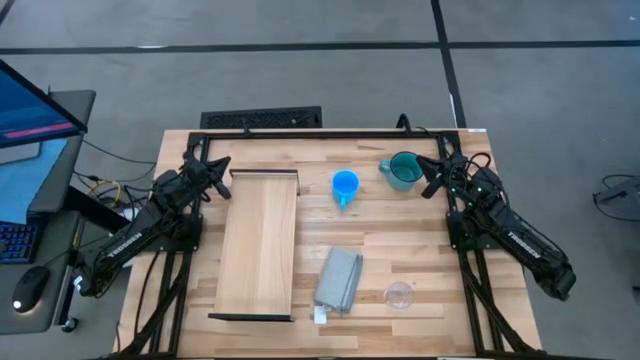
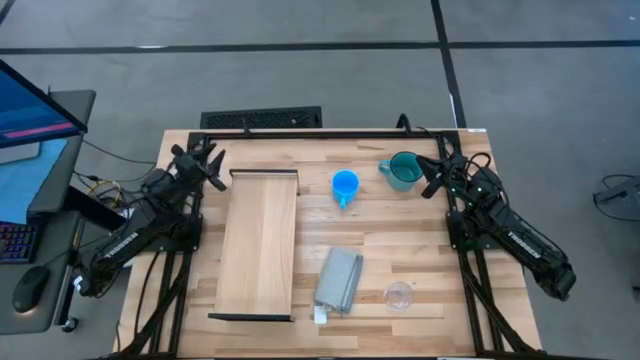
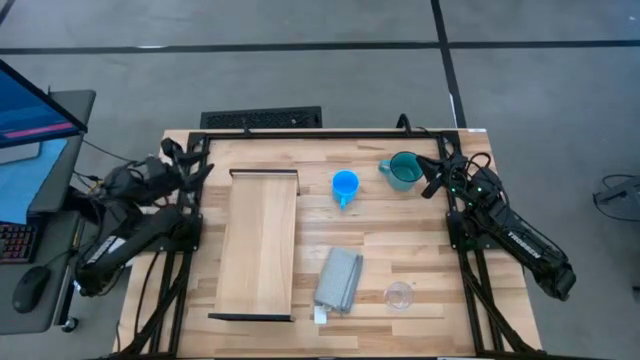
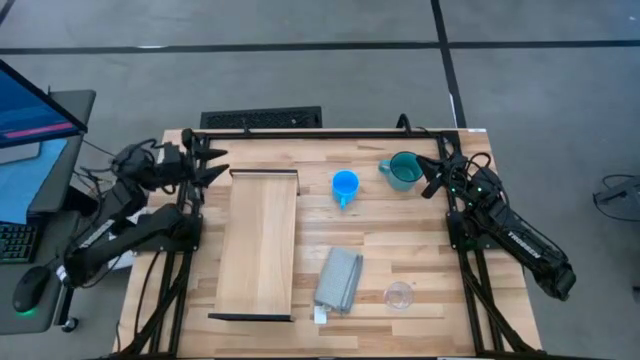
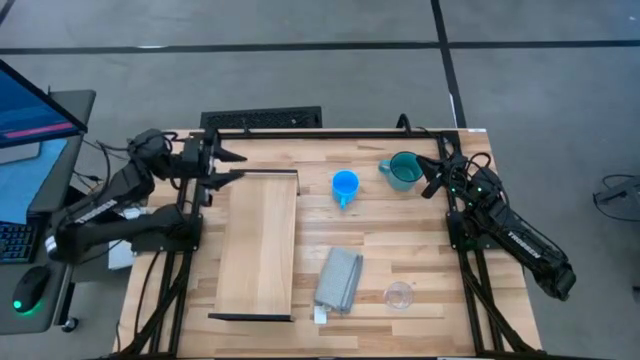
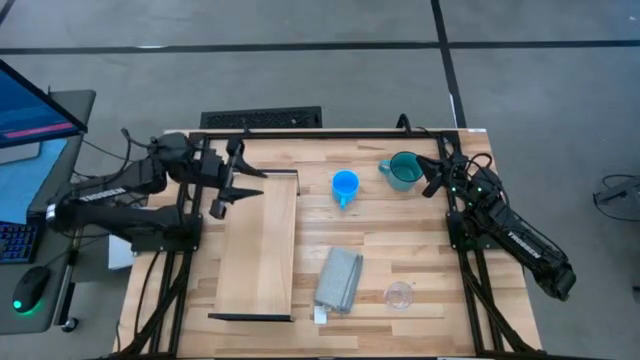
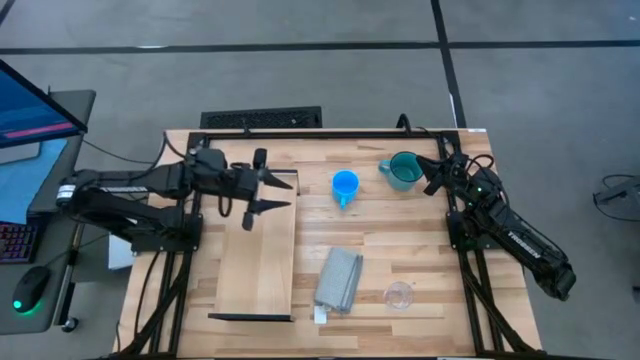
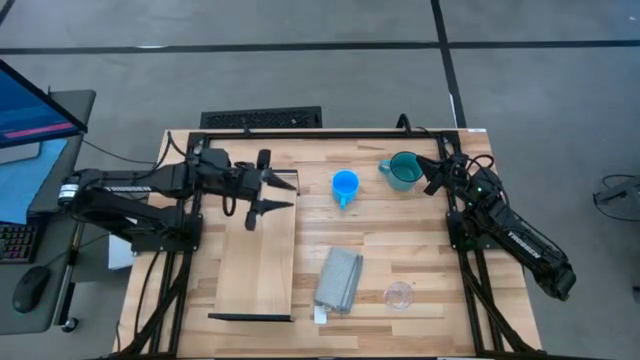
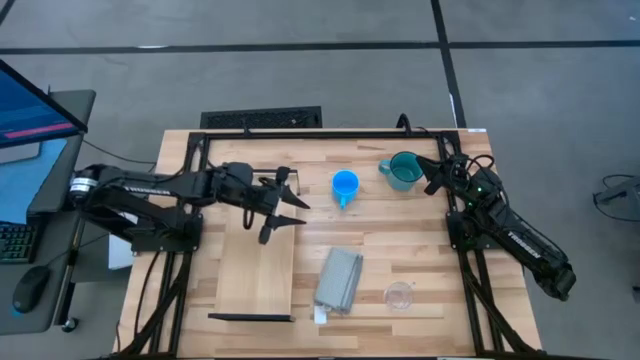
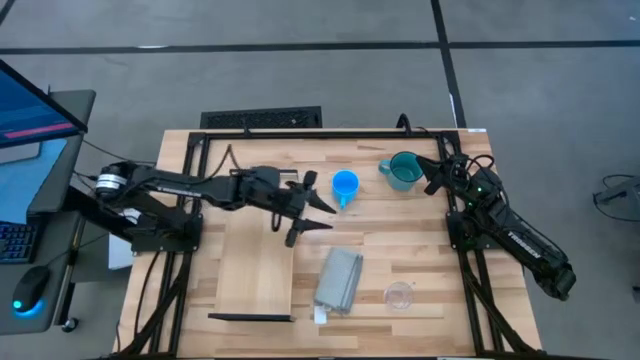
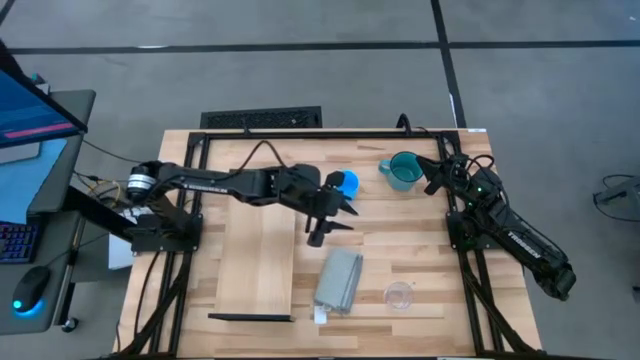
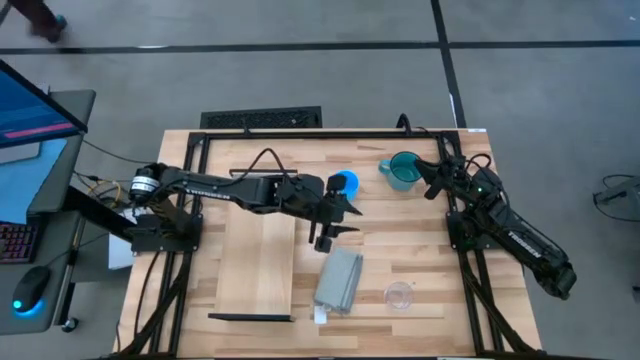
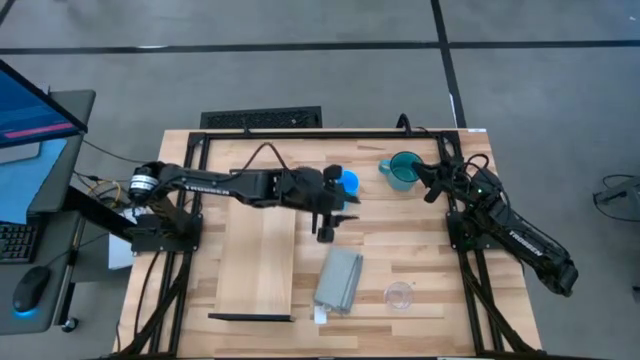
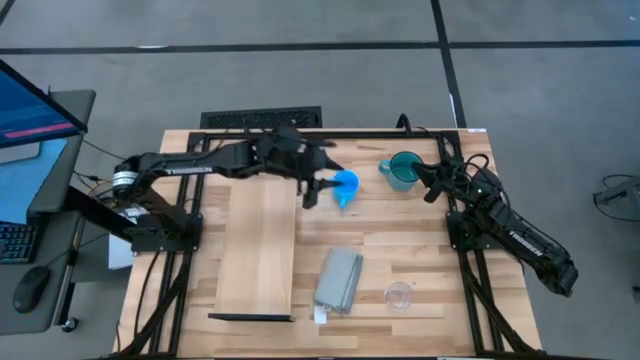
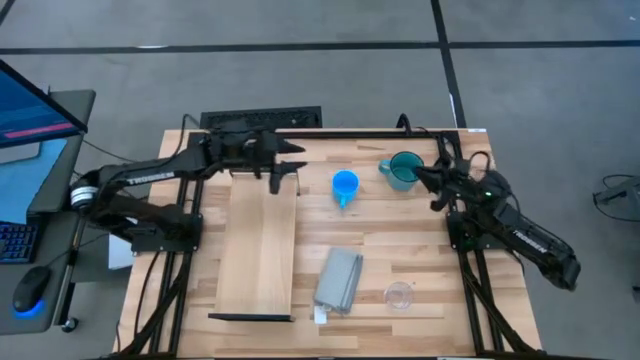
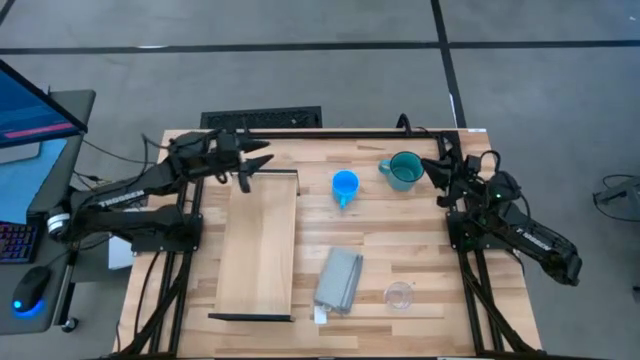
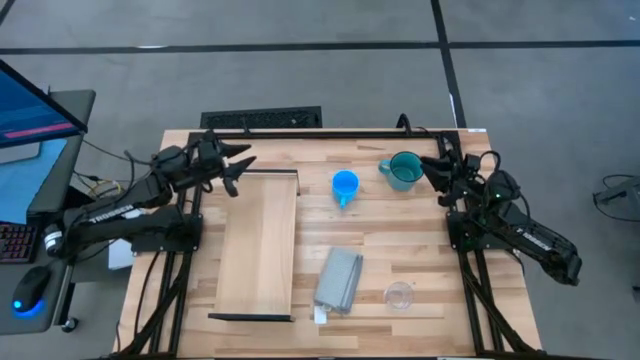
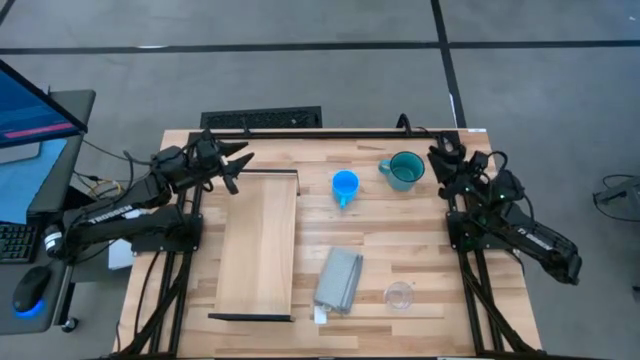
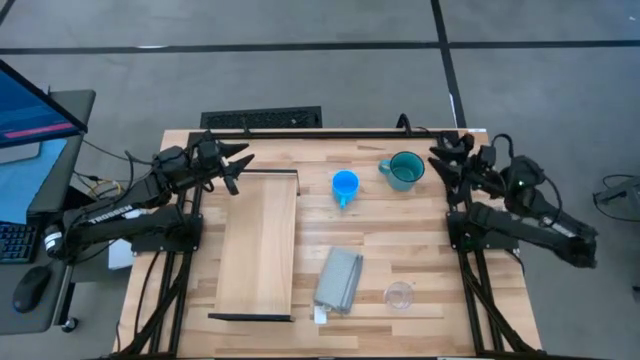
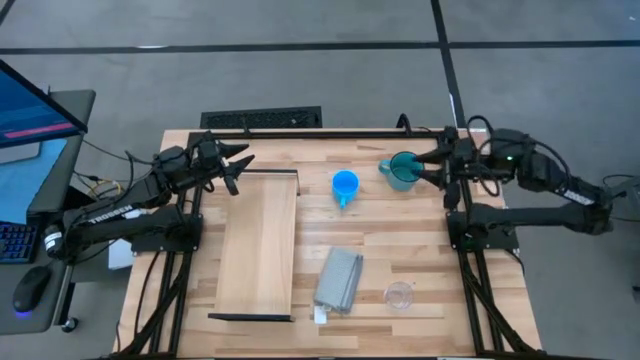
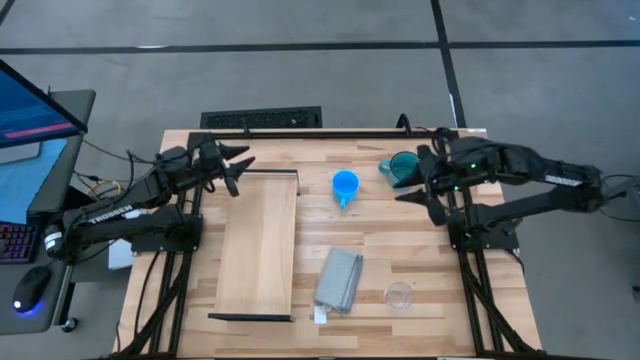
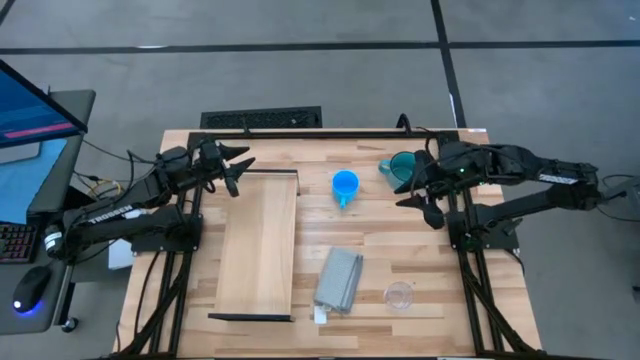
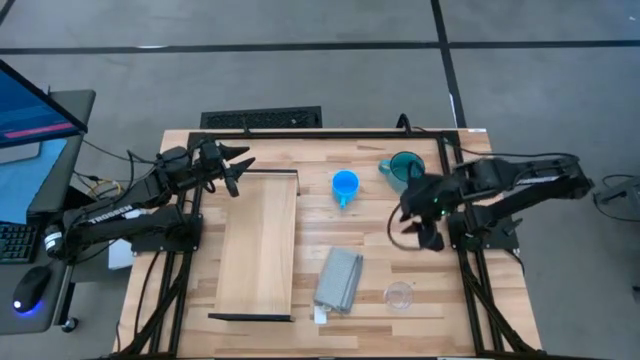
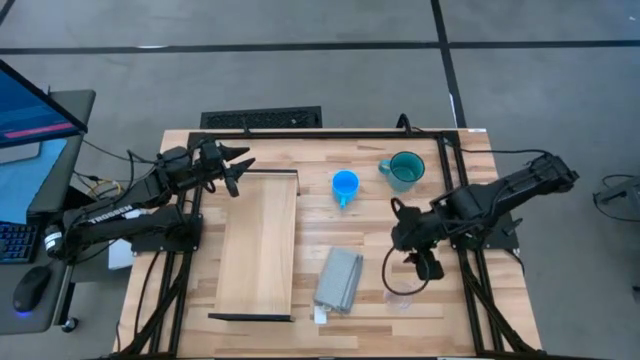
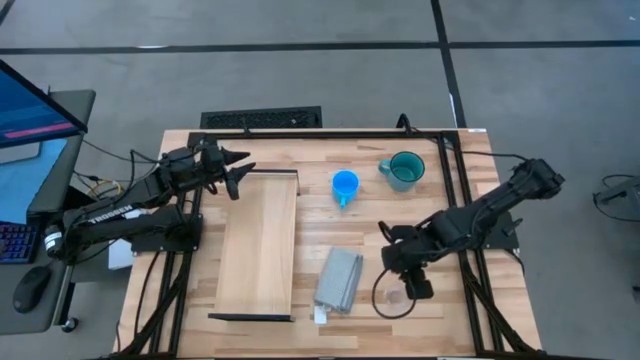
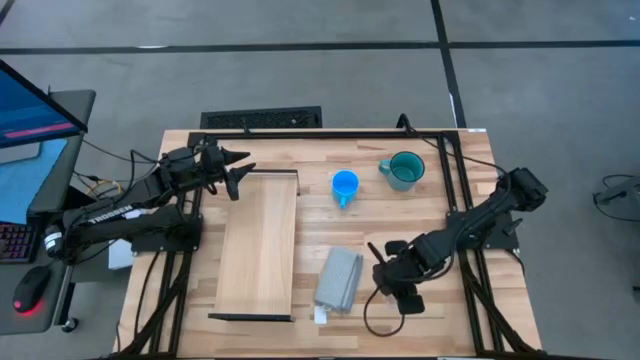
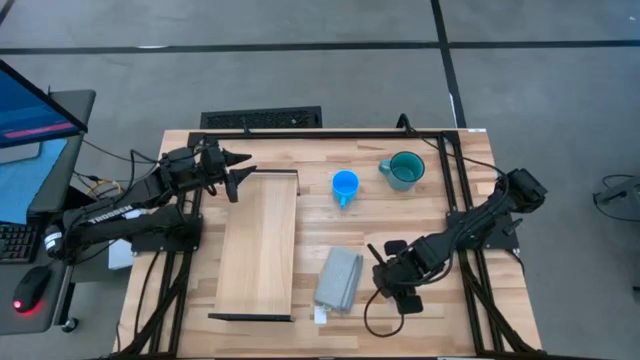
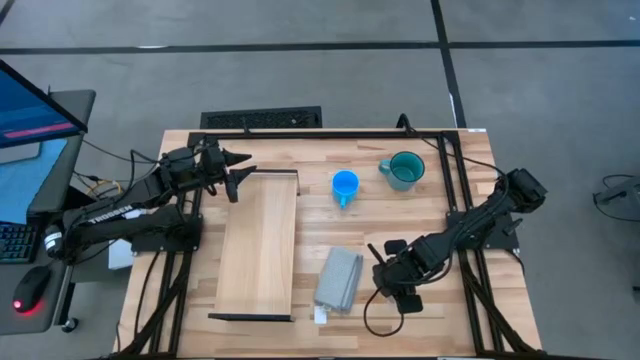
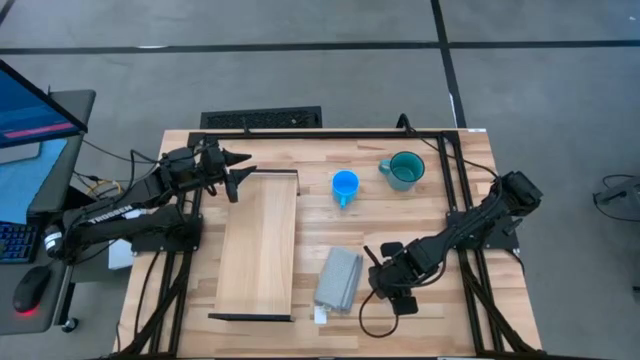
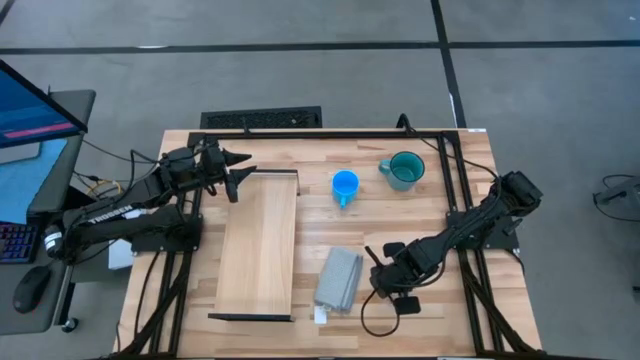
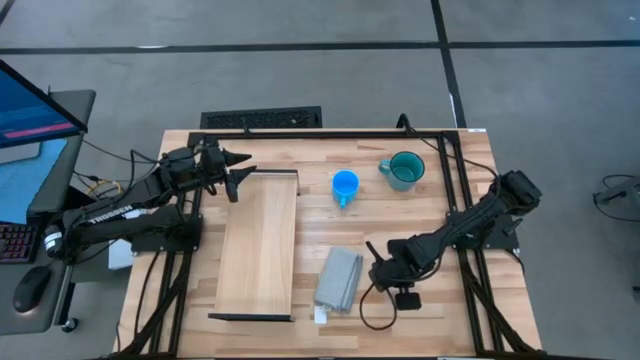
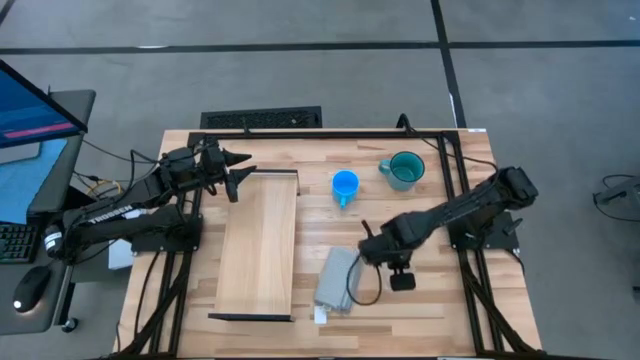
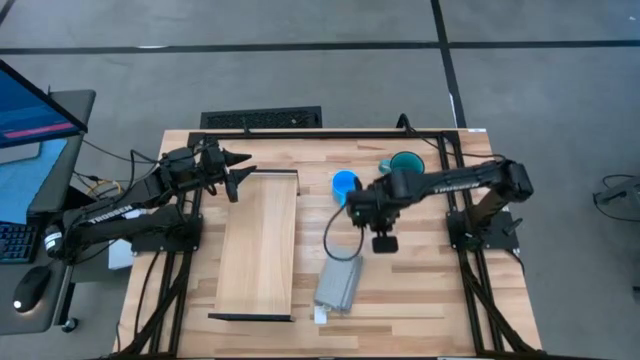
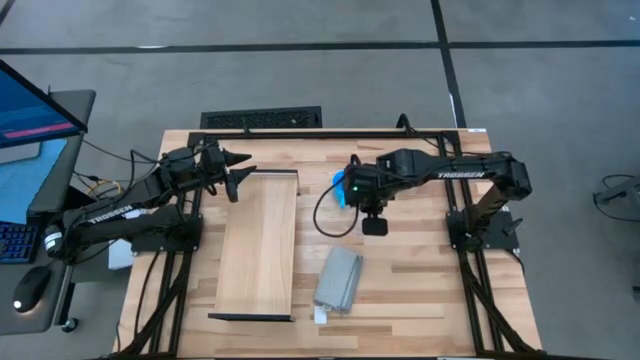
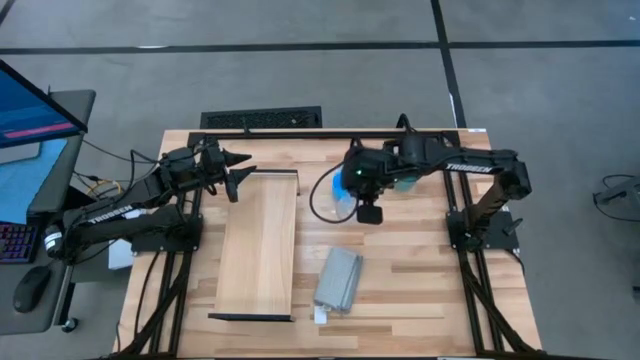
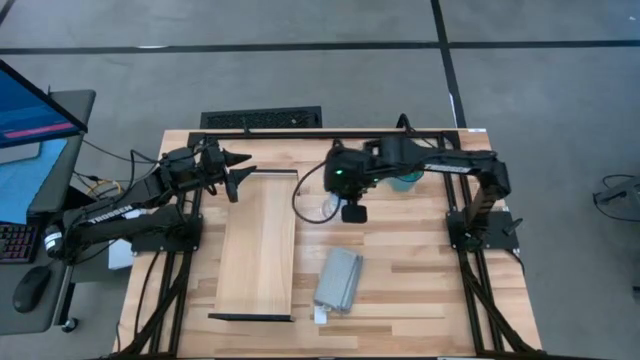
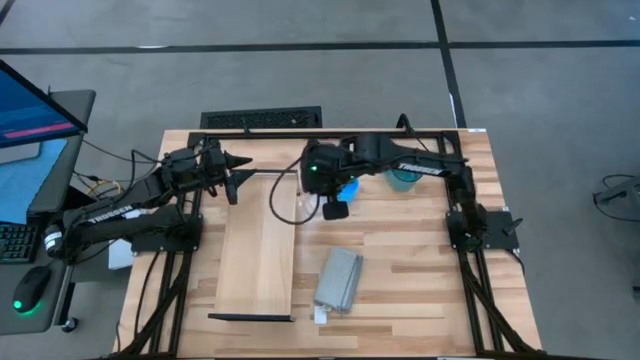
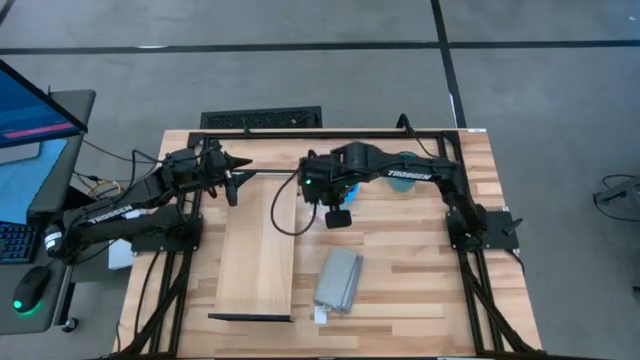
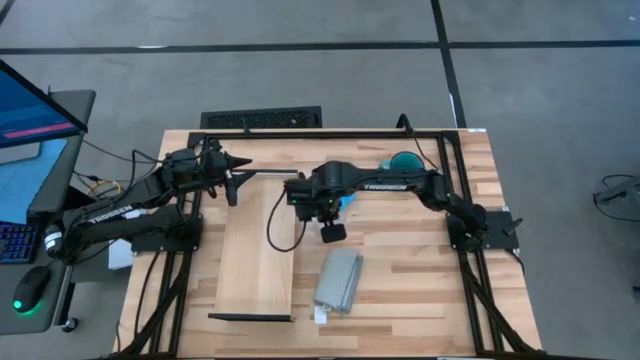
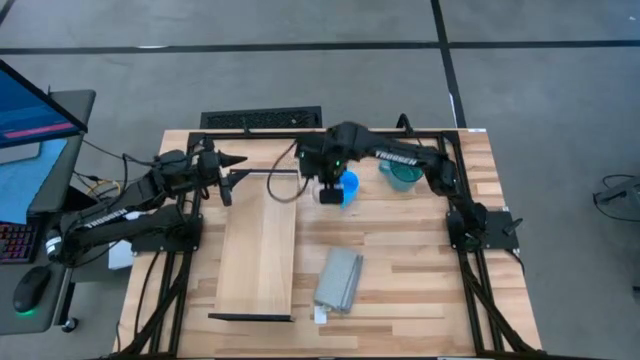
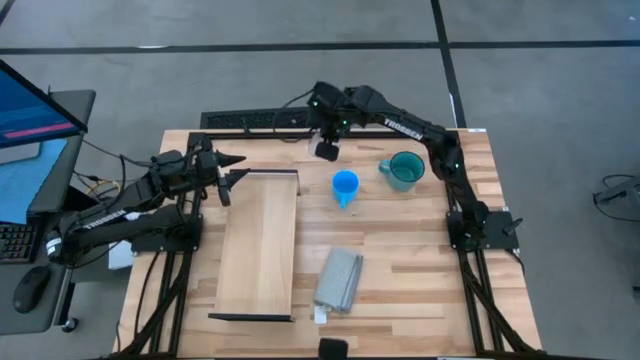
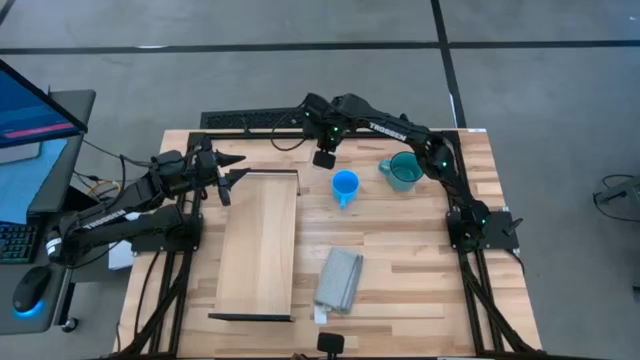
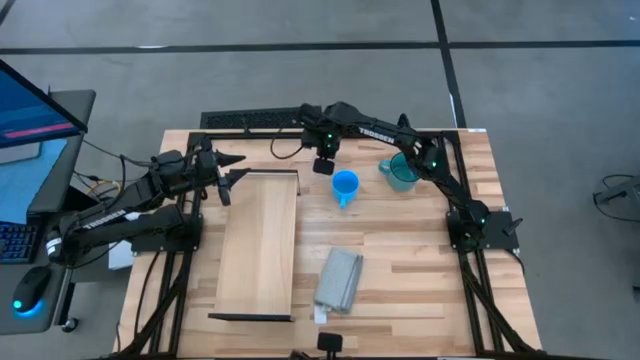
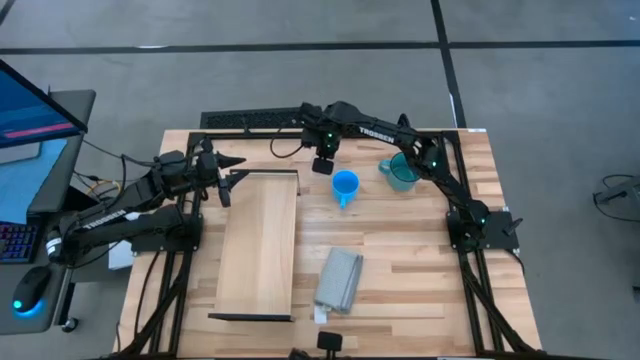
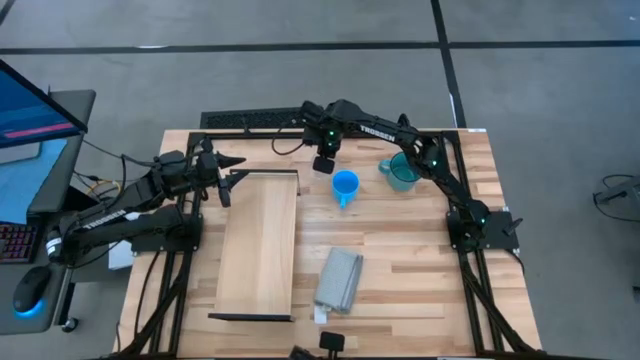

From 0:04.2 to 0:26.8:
Task: Stack small to large cups/mugs on shelf
Put the transparent mug on the shelf
